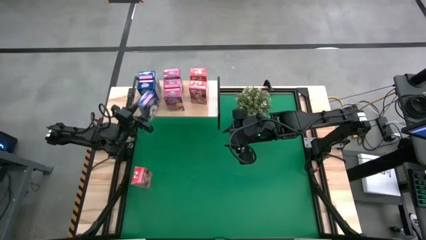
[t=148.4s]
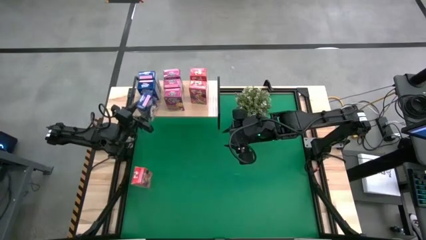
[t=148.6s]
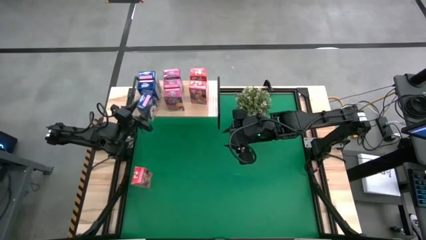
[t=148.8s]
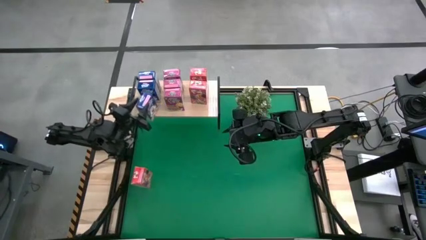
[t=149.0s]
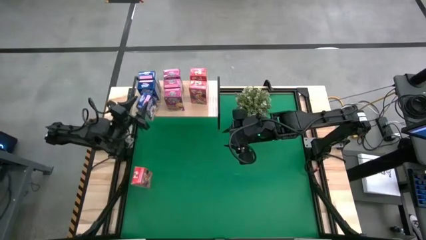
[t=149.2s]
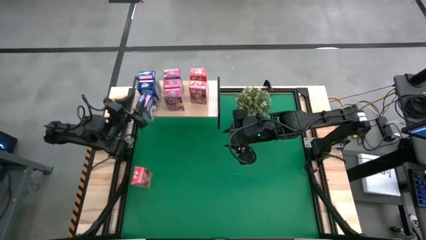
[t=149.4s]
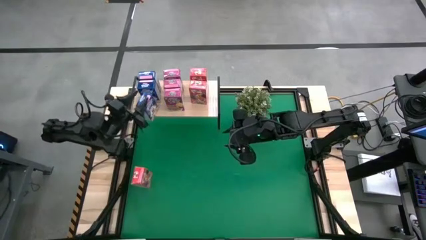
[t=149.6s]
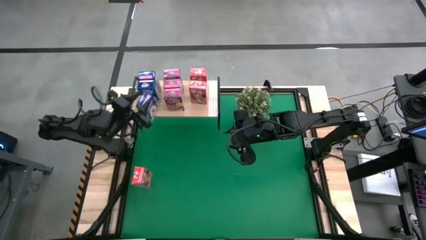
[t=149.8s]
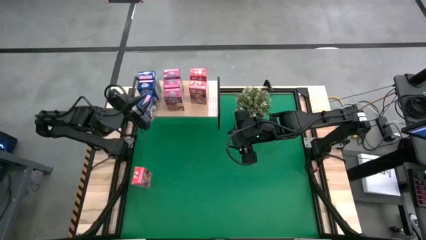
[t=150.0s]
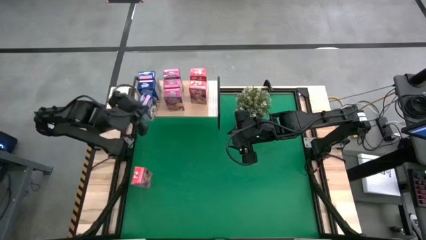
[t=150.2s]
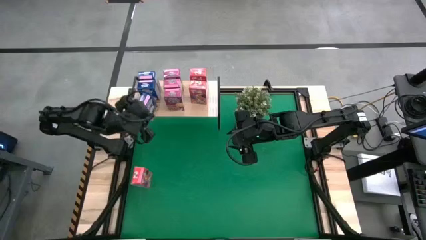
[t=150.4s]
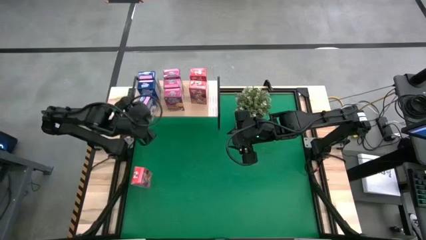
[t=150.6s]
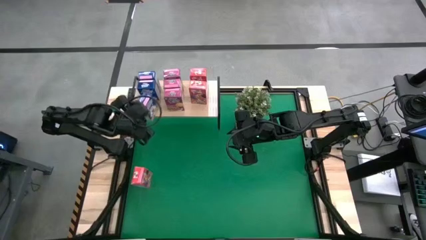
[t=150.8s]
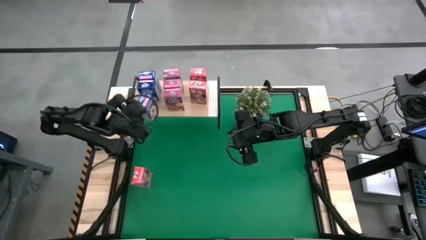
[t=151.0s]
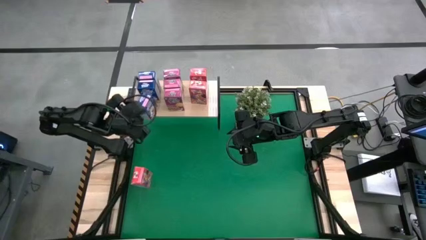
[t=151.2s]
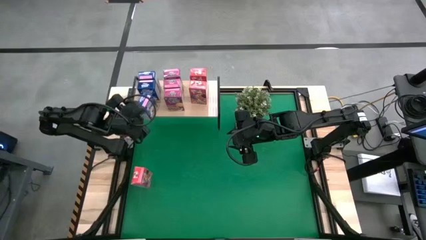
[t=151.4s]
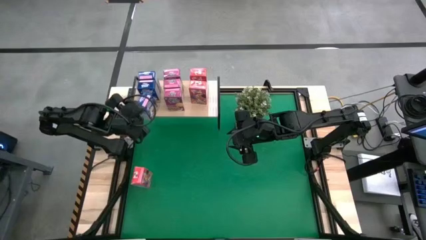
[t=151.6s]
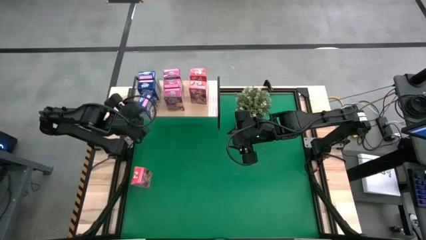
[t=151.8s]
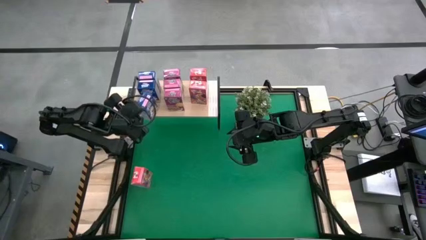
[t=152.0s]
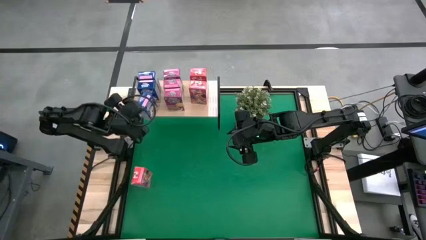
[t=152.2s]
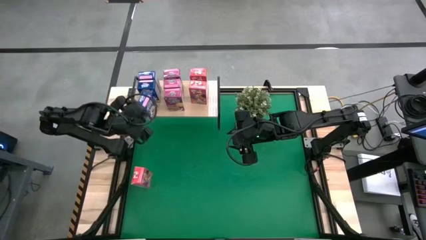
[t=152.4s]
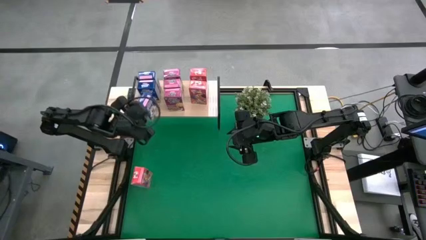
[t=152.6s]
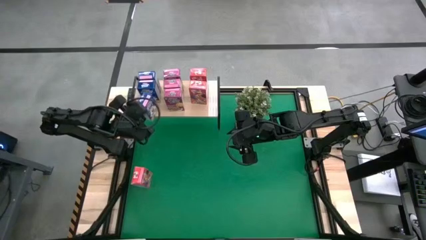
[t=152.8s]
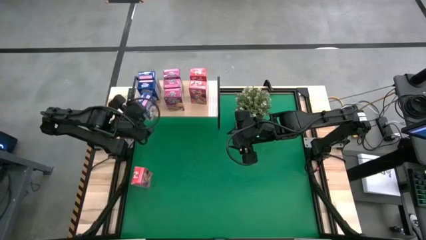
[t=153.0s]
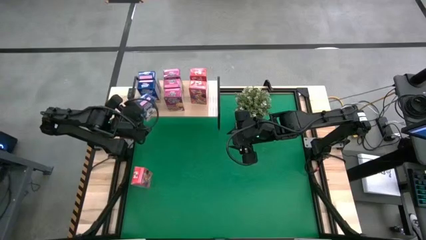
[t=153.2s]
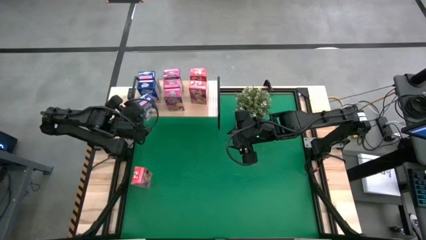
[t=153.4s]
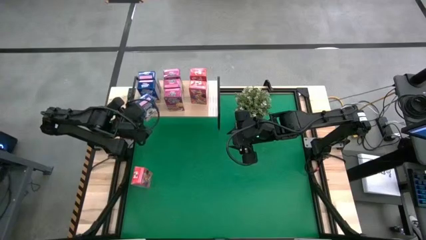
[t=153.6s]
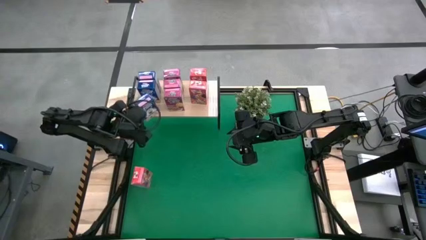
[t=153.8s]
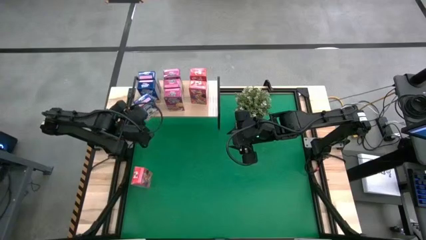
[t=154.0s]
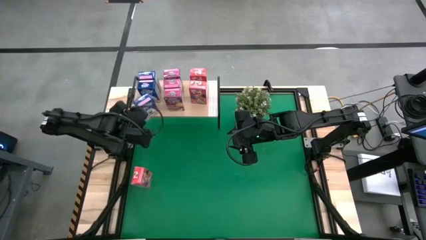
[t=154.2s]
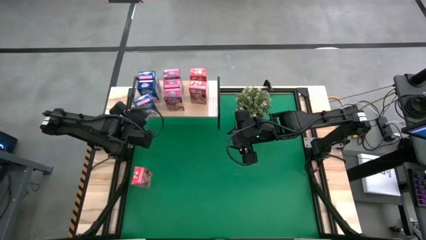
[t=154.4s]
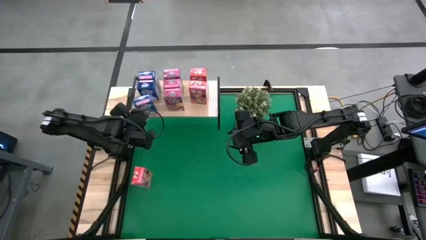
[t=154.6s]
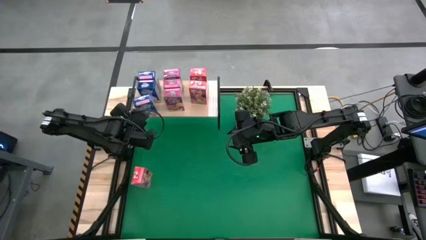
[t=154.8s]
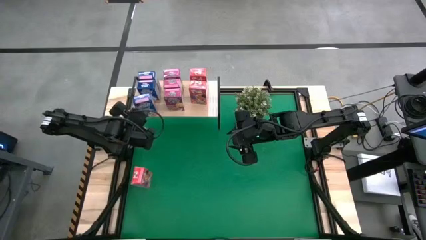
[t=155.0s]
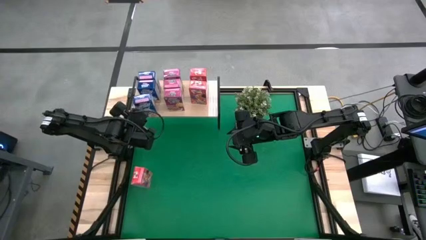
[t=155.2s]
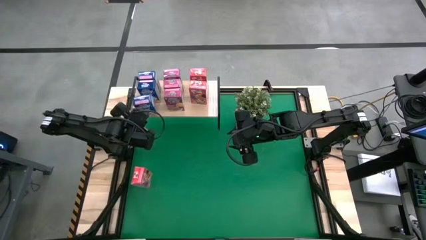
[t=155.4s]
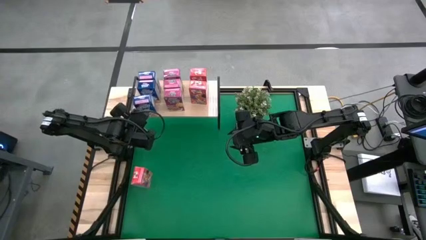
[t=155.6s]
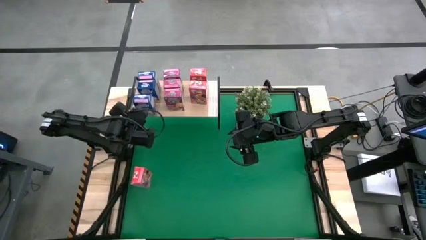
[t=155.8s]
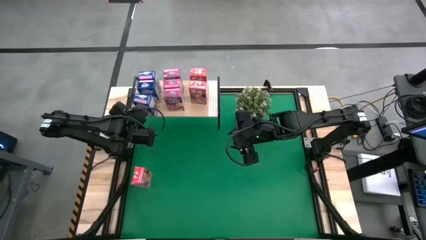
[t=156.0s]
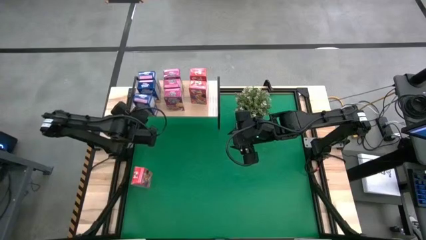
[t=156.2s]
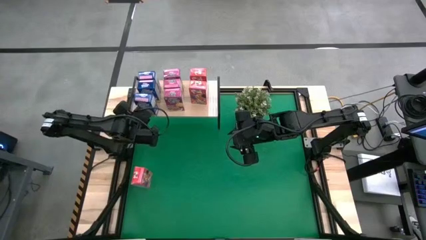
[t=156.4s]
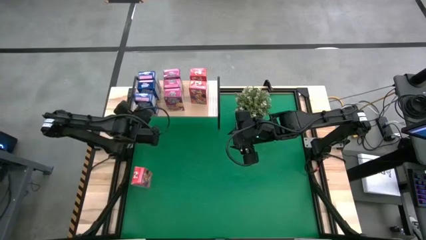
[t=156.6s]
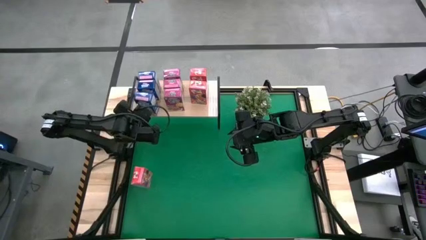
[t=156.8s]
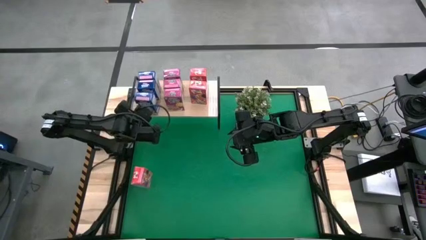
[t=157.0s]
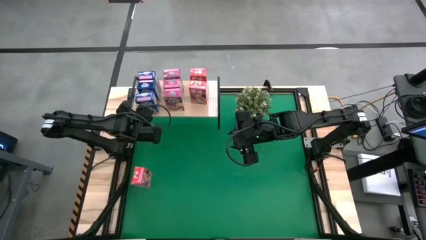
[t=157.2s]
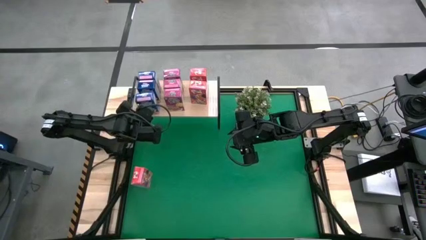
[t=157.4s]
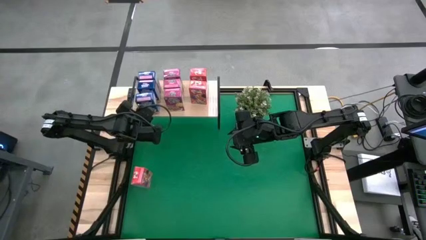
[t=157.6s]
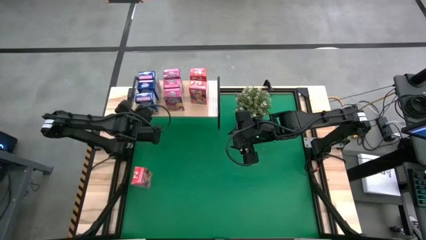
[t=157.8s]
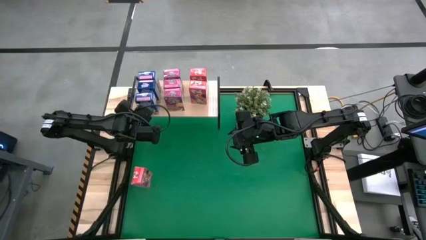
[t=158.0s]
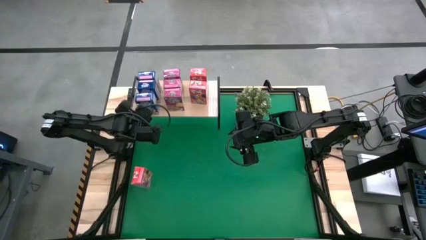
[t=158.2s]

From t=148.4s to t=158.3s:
Task: Stack cereal on shelf
Put the blue cereal box on the shelf

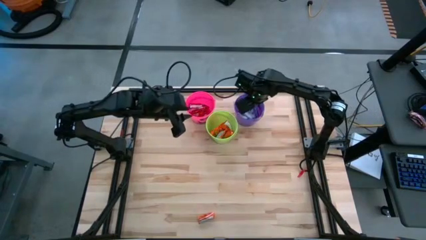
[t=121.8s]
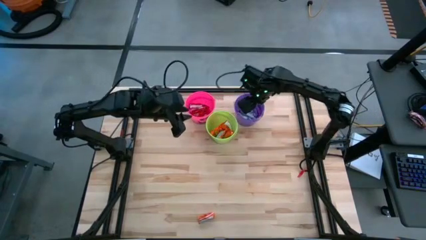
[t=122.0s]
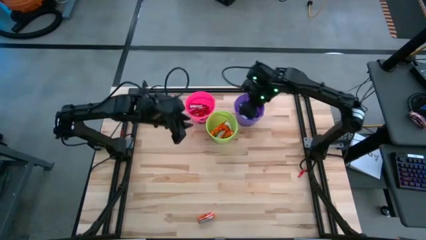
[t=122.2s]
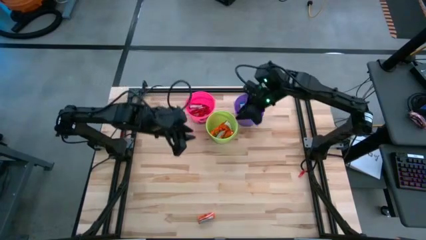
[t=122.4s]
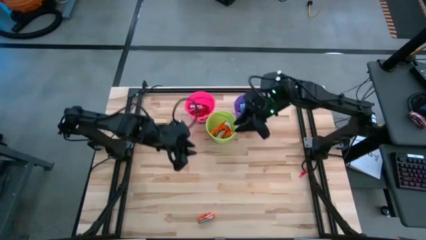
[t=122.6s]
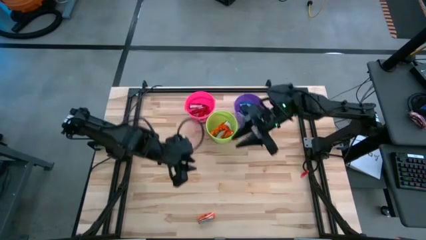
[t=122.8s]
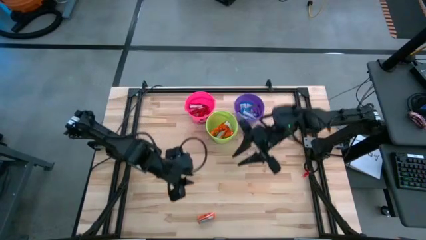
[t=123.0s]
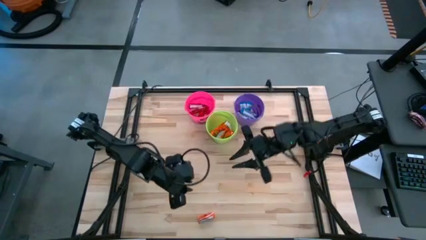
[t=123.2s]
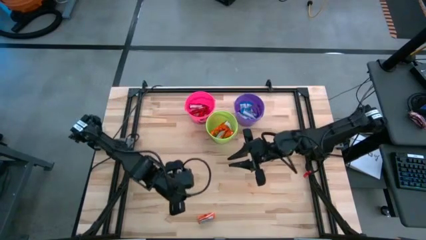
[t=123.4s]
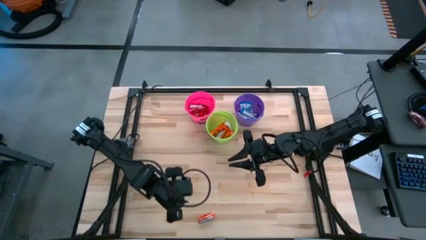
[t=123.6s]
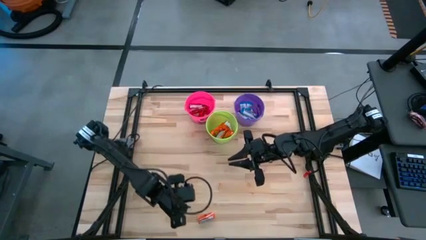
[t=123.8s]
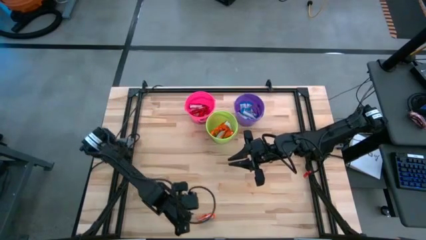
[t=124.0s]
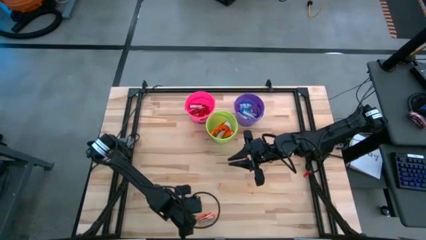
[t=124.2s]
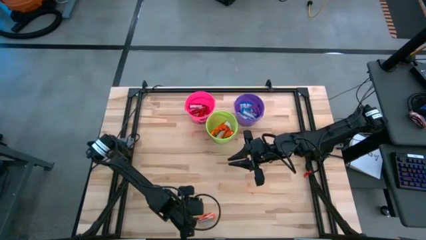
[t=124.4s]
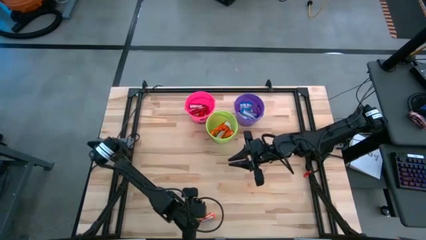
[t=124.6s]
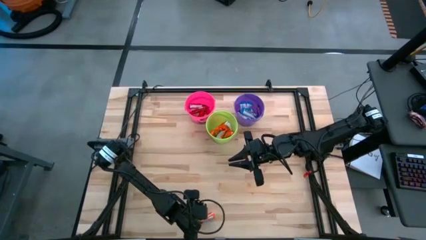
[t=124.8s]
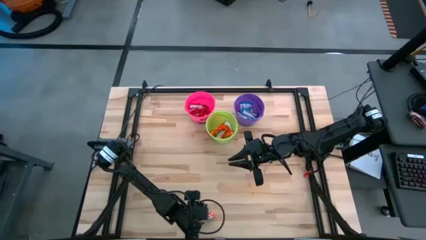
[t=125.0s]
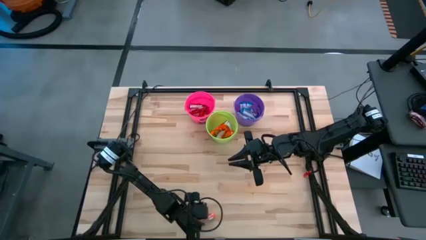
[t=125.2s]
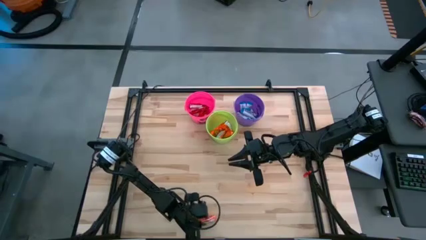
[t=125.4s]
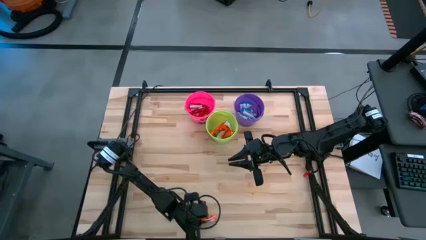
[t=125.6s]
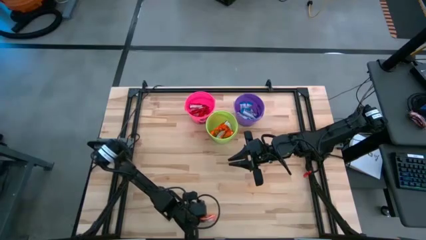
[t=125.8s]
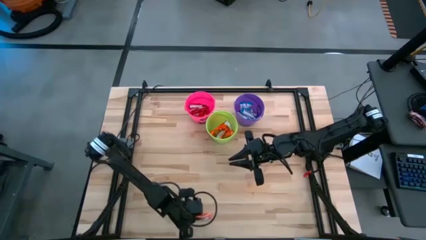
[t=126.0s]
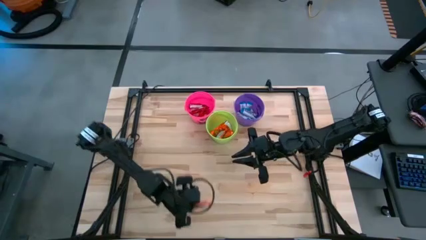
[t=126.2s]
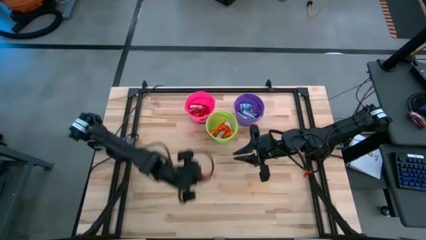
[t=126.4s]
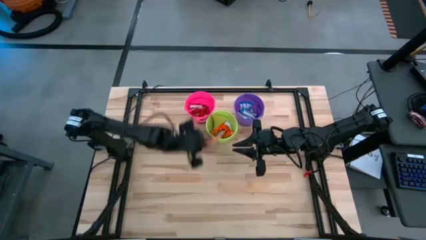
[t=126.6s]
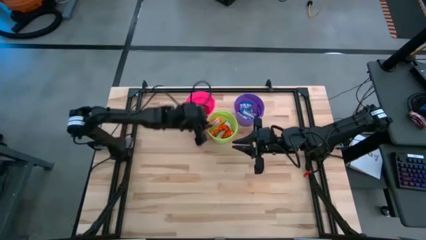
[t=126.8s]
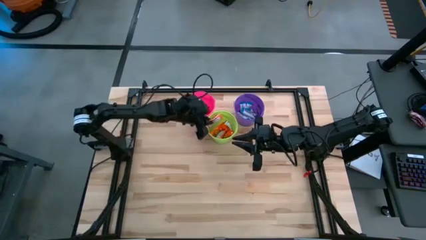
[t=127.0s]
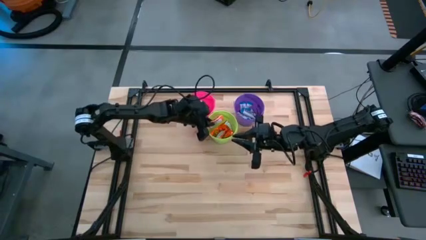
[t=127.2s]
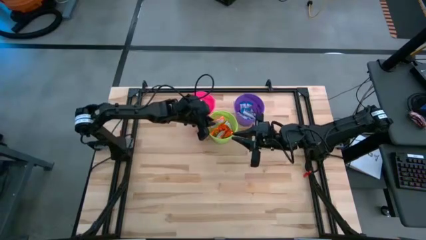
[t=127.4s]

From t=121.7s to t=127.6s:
Task: Sort candy
Put the orange candy into the green bin
